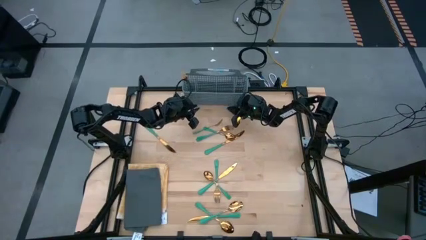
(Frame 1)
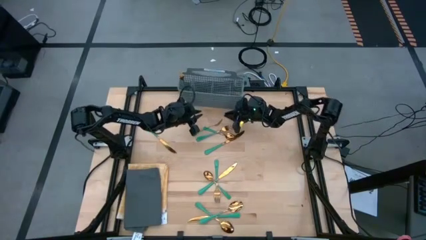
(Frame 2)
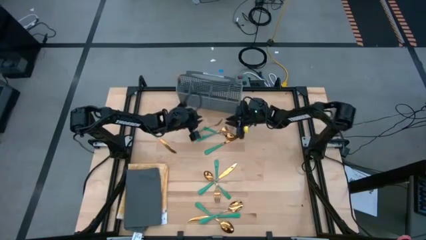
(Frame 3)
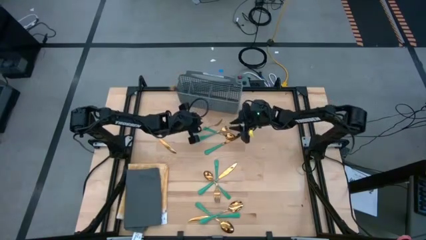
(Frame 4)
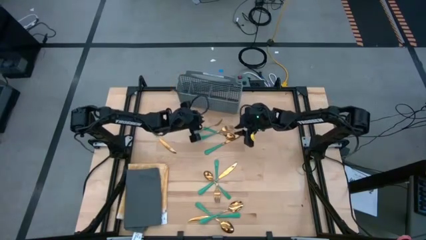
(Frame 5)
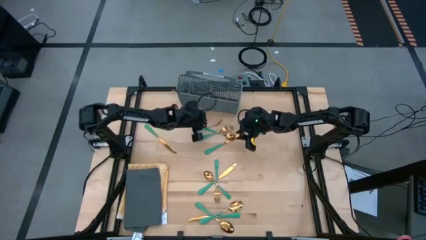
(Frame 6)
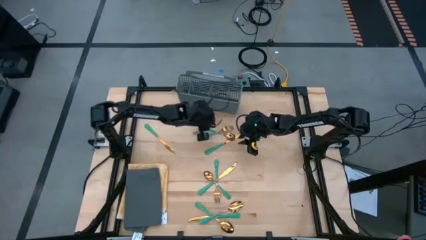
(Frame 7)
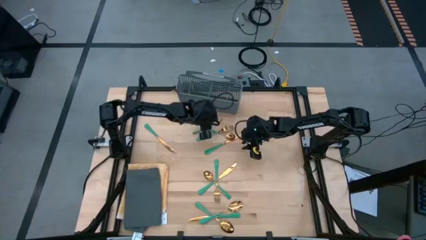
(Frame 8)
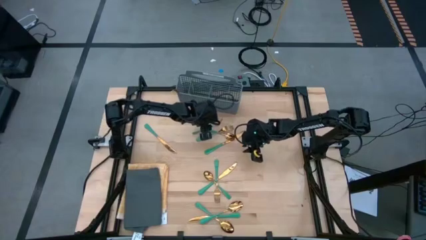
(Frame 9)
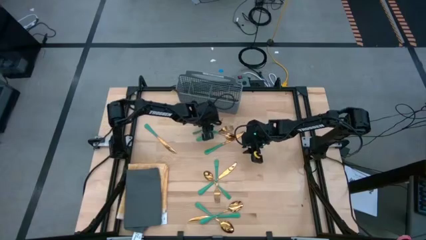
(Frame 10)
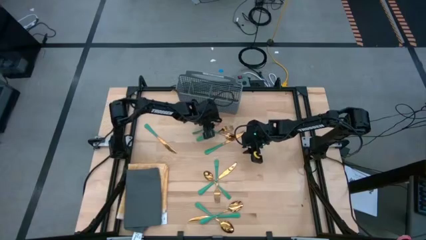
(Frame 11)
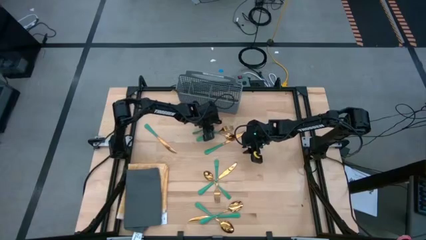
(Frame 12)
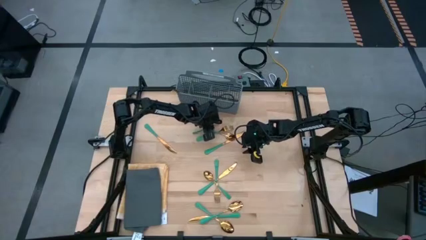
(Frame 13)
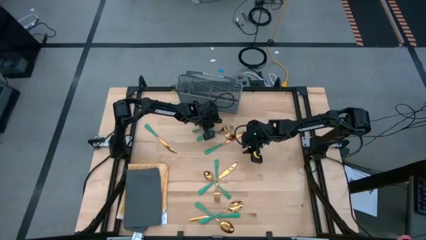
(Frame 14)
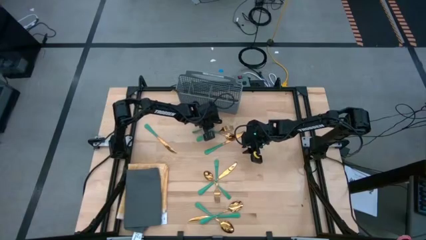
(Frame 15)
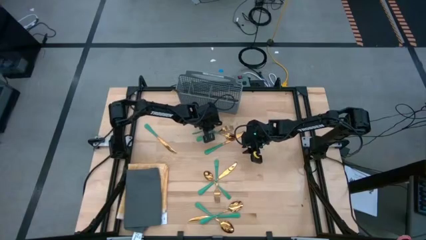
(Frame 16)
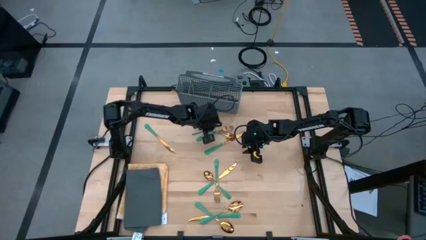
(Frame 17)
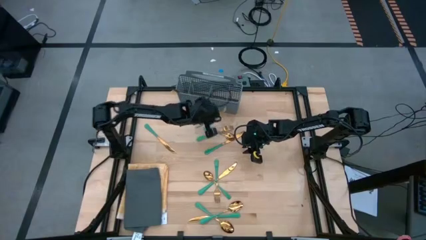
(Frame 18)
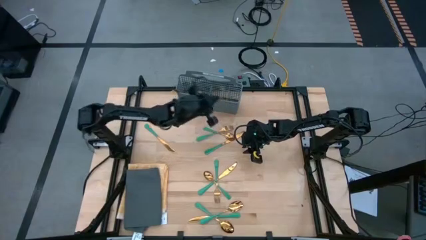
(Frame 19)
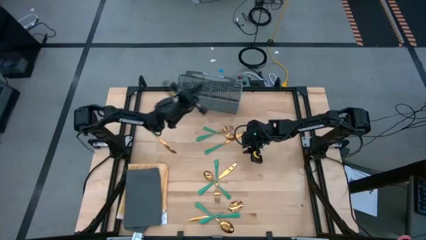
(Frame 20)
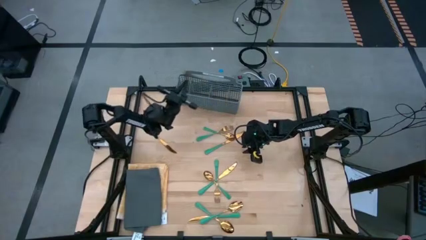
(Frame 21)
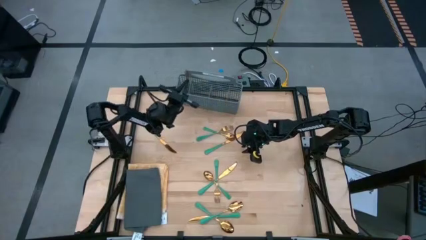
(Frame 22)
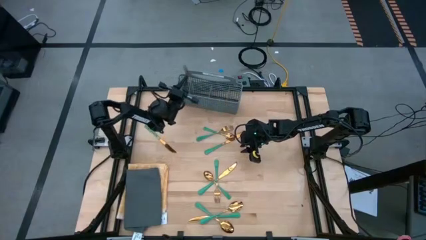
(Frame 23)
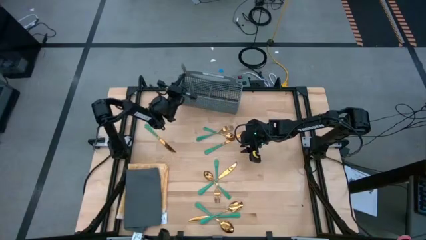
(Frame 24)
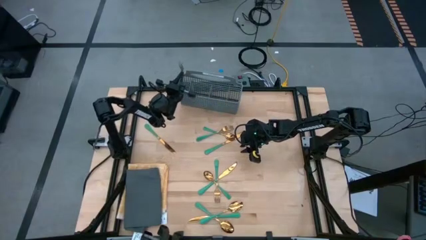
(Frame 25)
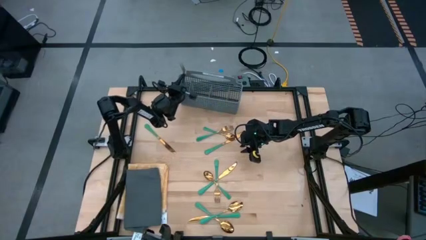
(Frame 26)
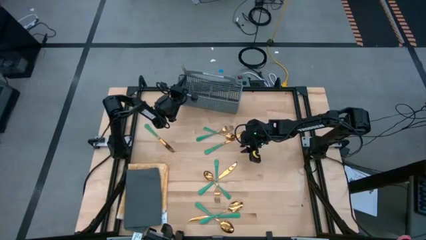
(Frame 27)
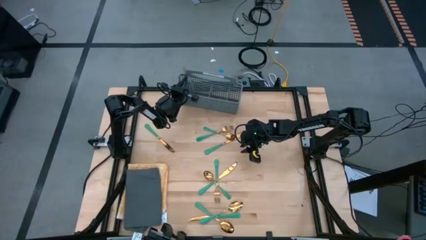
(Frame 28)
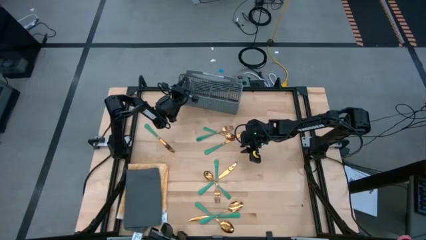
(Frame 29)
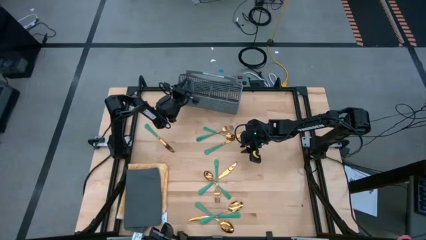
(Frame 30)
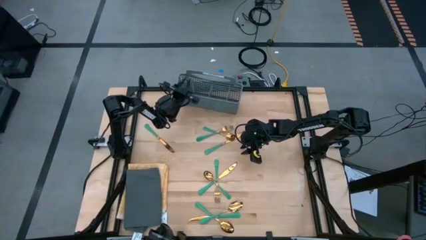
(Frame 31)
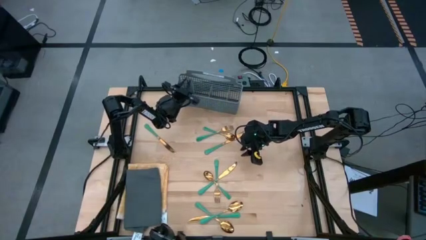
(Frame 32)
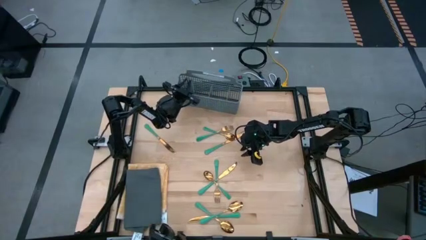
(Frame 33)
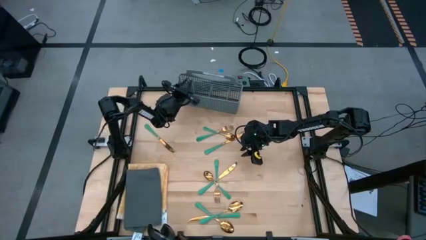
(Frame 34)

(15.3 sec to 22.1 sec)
Task: Sort silverware
Put the green fork into the gray silverware basket

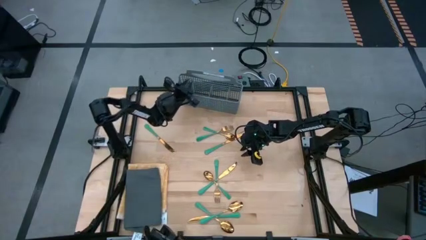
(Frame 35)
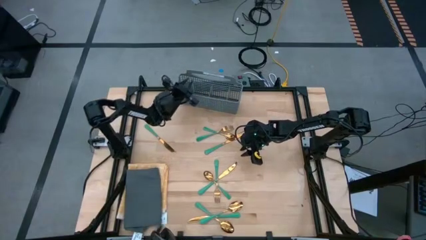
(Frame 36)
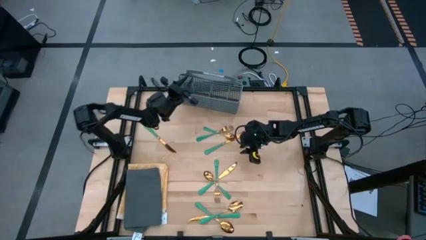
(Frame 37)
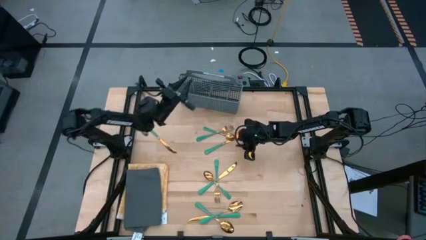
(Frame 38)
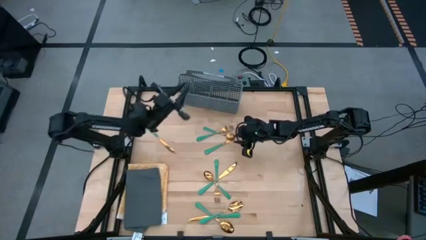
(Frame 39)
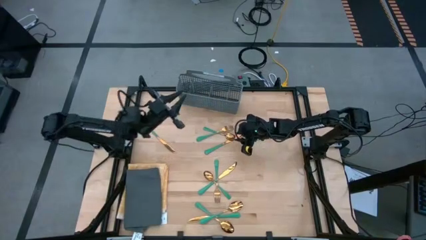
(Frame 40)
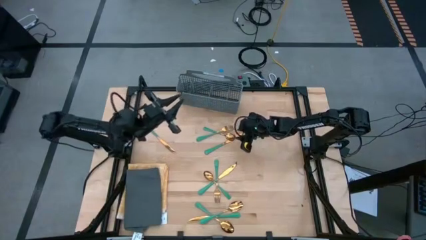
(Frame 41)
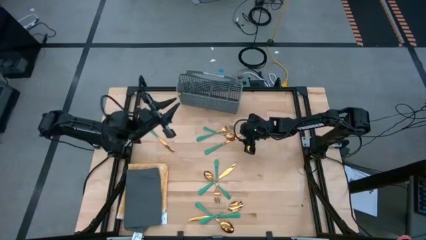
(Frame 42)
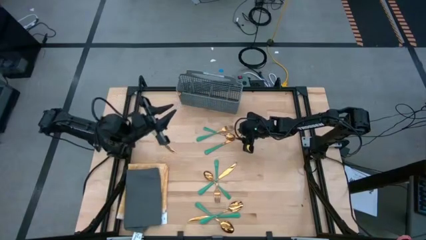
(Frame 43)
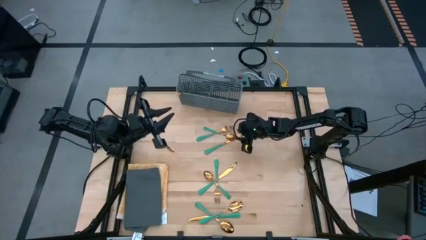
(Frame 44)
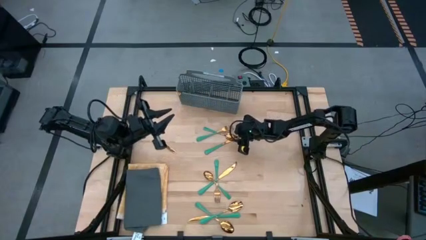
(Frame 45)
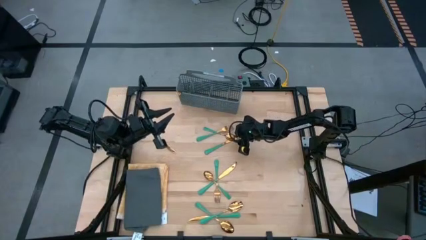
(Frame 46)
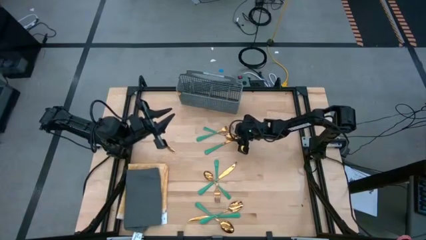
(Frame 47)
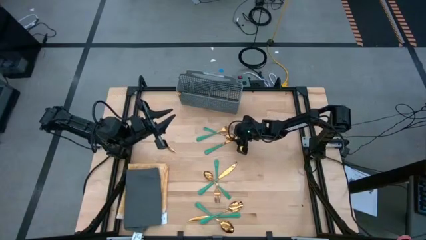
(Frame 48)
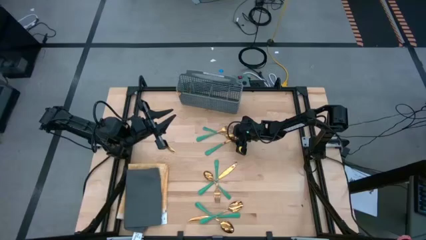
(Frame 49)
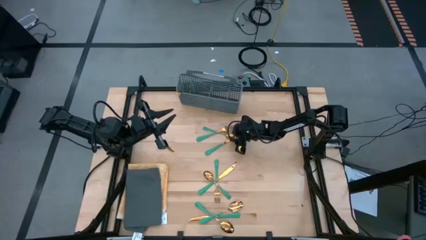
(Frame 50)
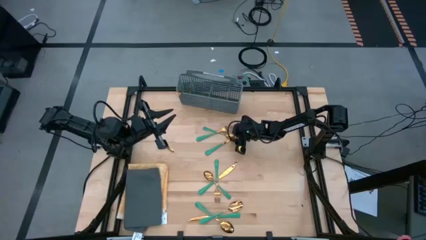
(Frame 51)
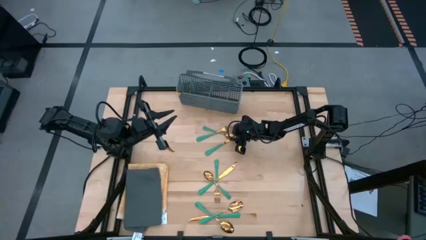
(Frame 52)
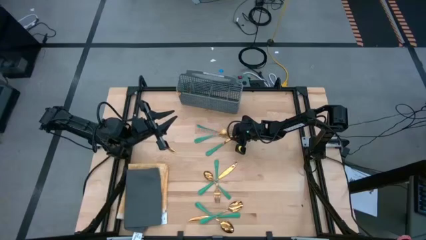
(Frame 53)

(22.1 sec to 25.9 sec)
Put the green spoon into the gray silverware basket

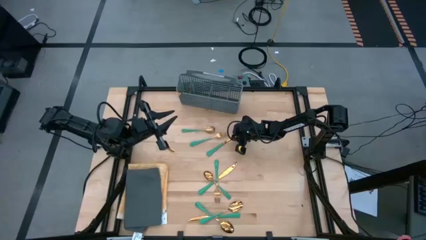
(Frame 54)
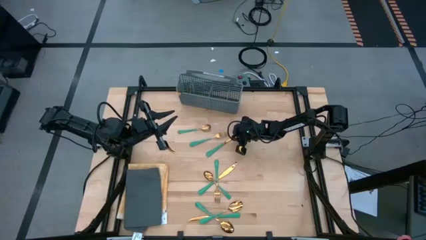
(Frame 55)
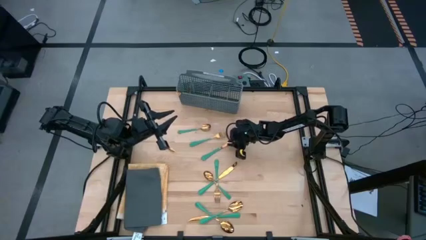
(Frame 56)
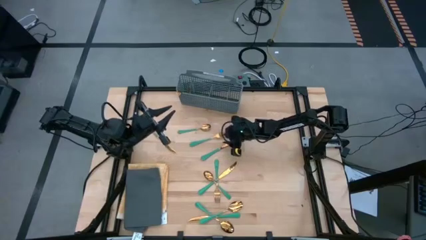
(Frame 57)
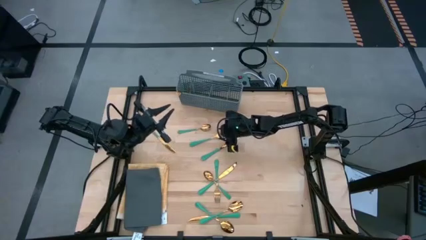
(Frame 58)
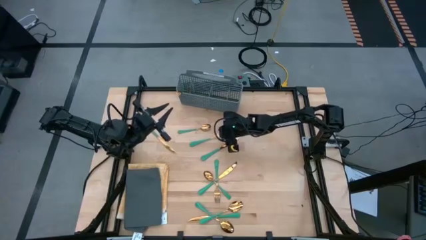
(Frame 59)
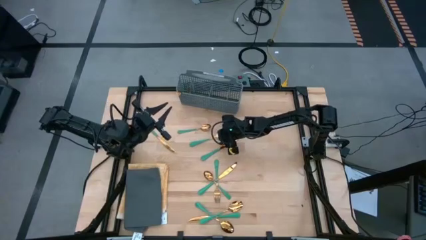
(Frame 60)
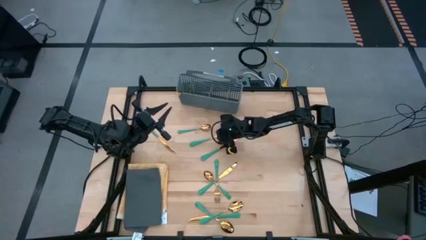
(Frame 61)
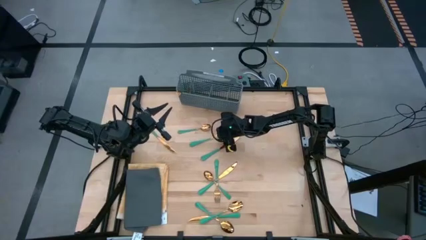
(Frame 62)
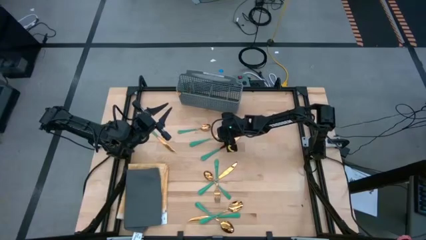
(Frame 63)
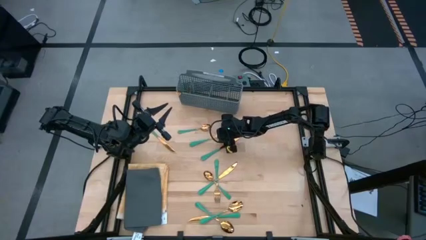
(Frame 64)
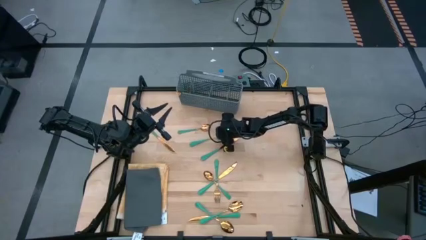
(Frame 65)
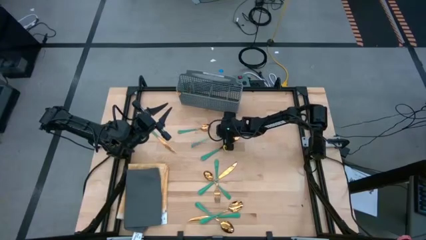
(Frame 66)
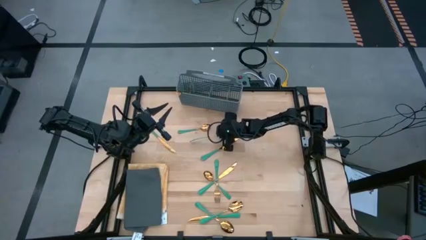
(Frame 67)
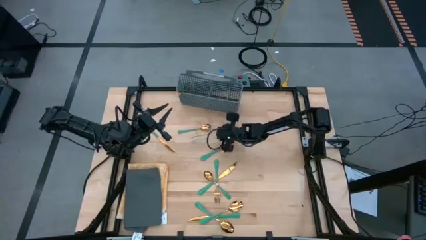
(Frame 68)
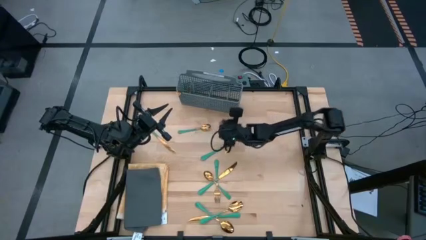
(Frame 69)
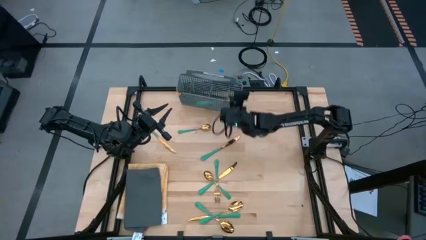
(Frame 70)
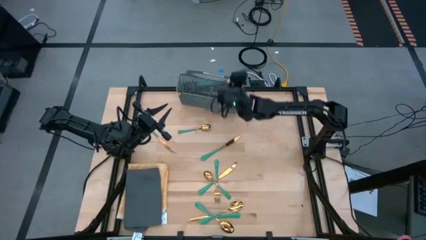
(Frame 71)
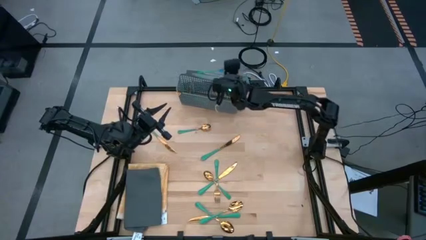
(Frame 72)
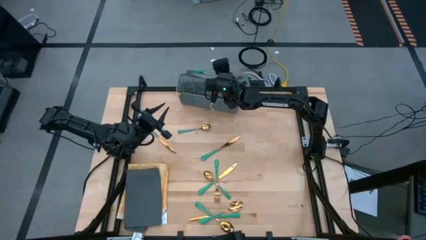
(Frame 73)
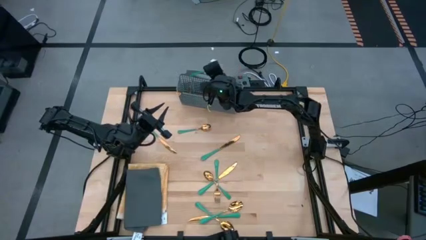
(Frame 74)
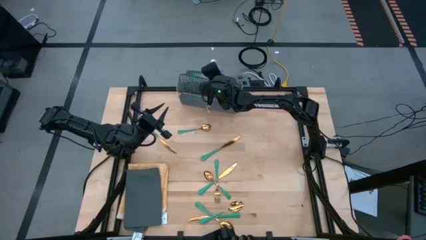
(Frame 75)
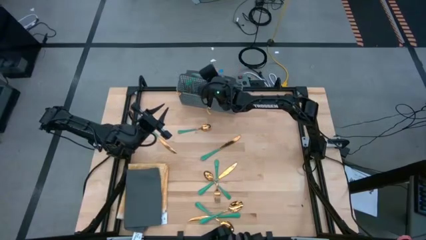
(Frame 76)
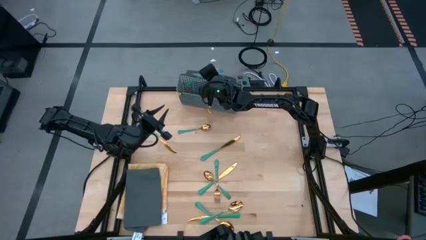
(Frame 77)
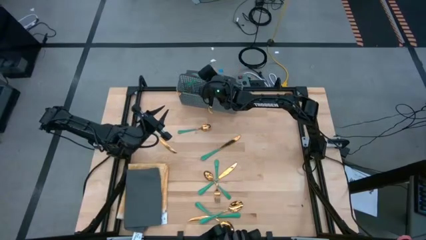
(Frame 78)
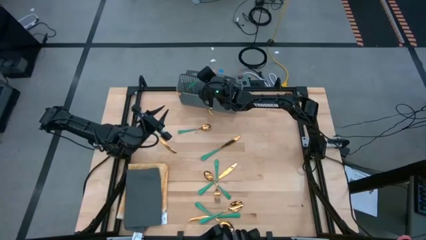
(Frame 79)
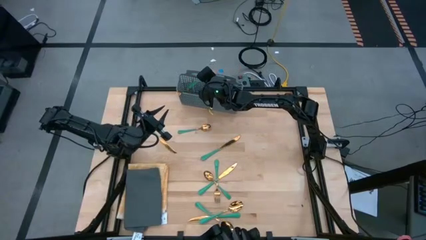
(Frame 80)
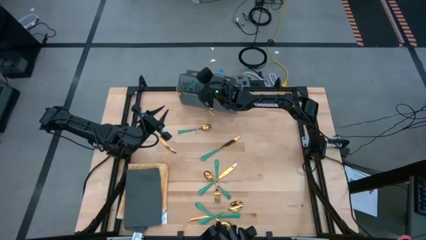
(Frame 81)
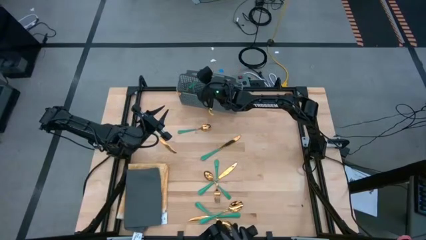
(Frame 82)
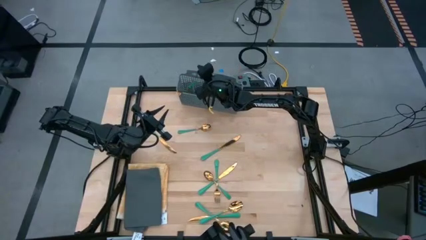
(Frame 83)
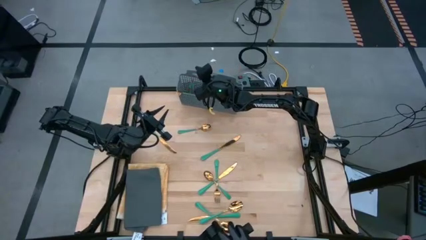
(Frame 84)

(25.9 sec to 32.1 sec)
Put the green fork into the gray silverware basket
